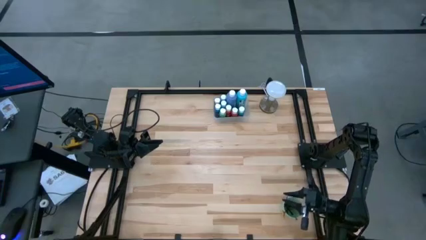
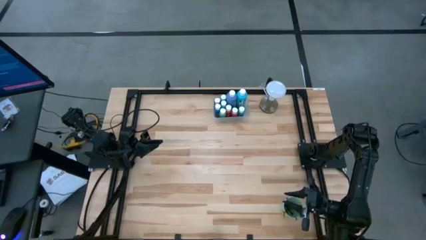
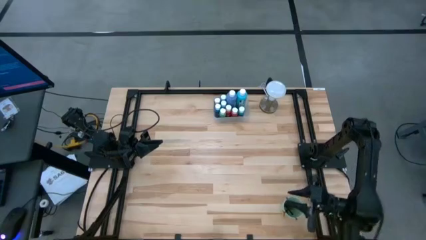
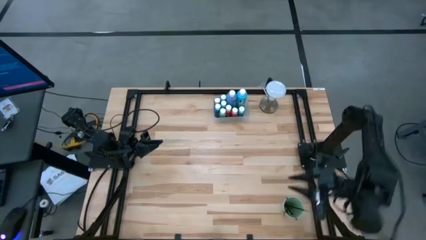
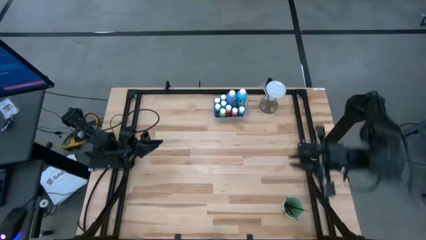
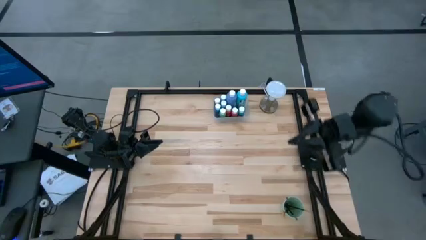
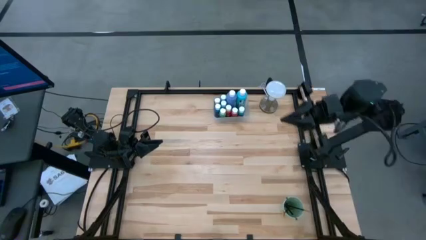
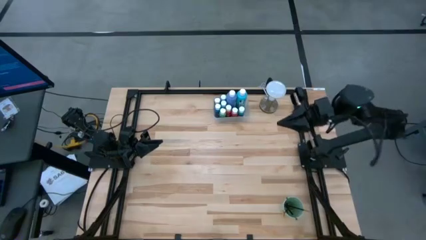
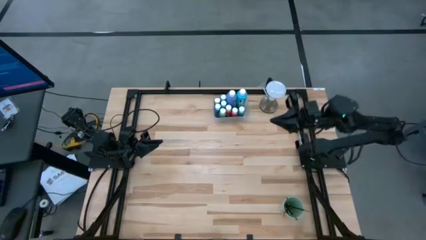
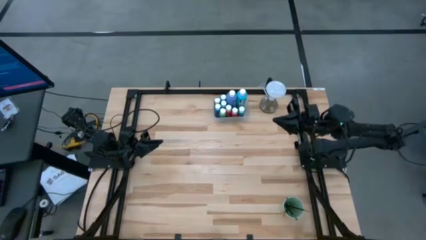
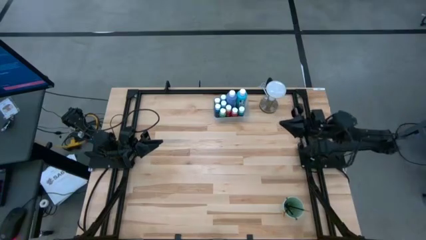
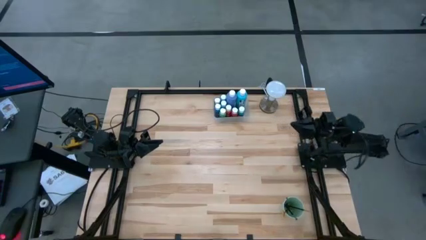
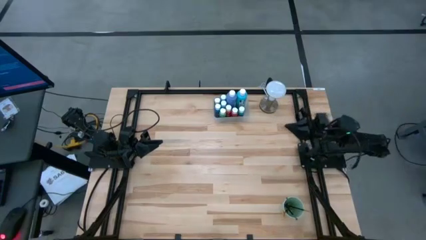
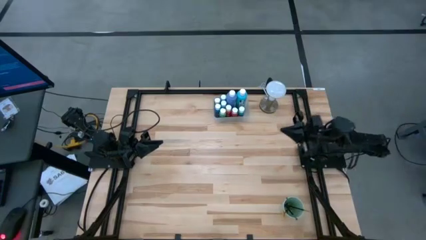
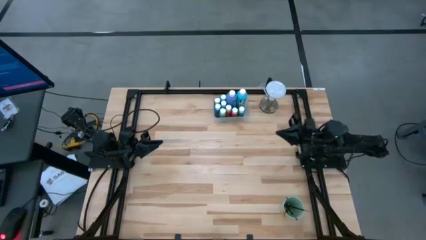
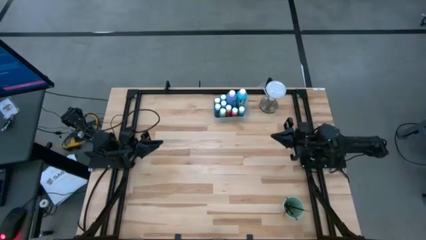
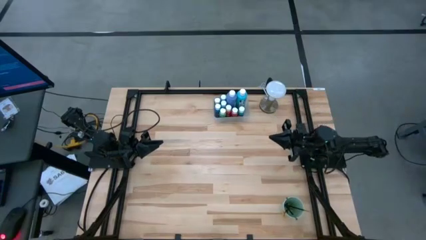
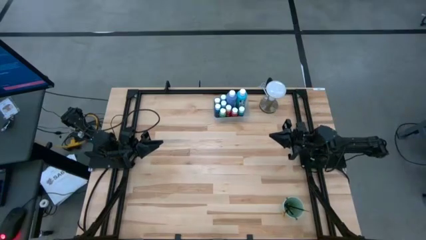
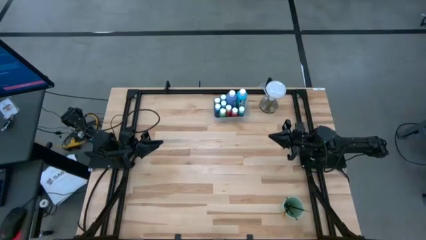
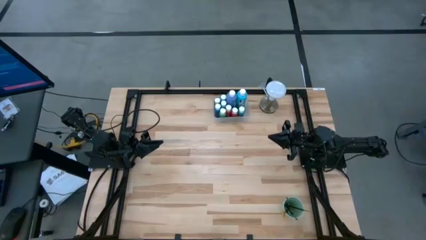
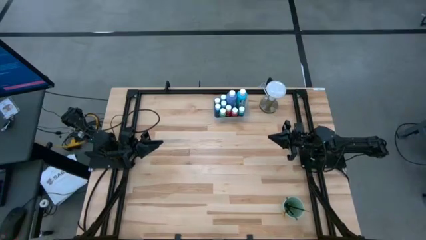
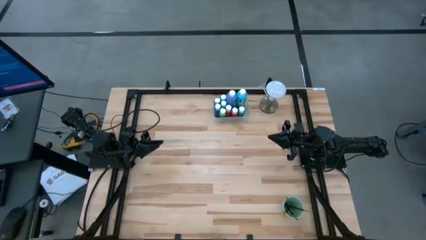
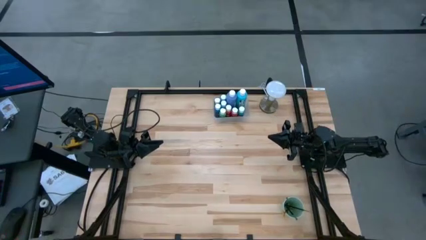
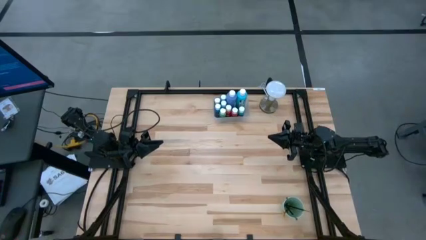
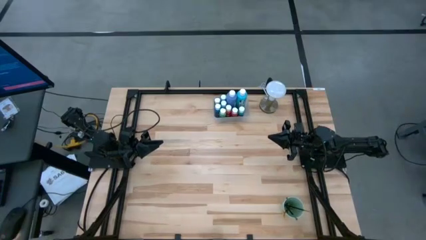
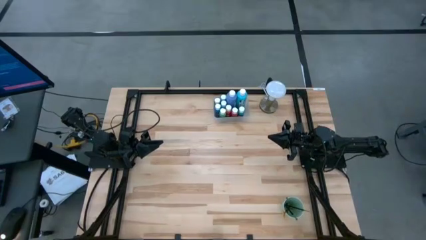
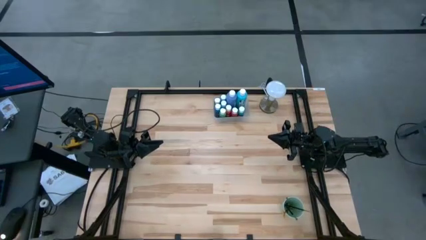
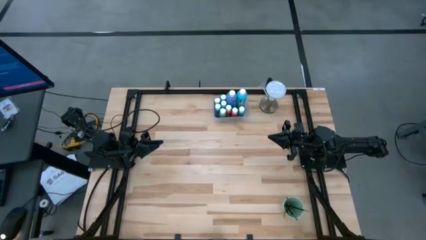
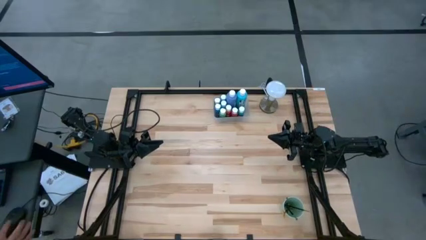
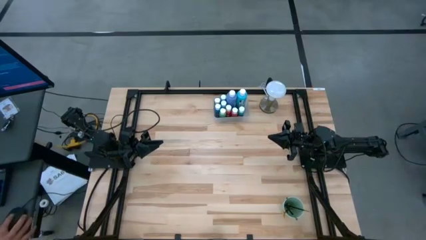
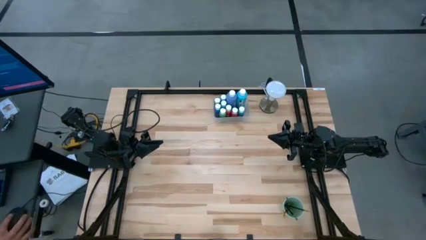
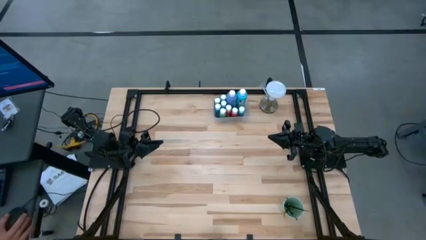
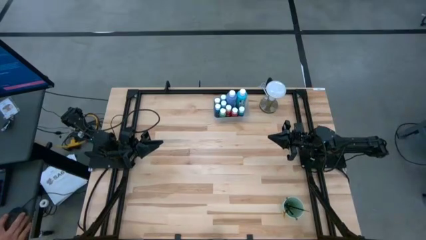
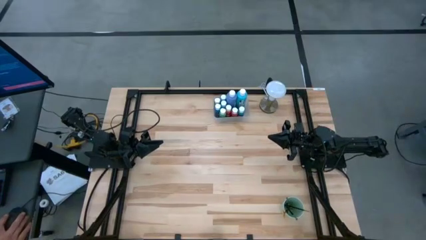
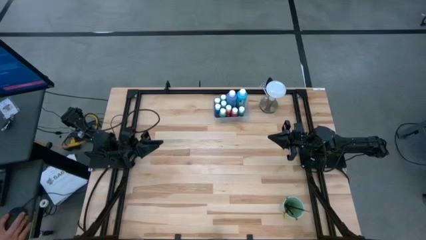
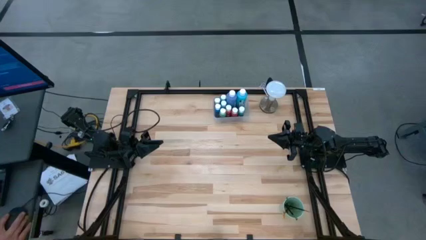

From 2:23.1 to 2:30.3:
Task: Pick & Place Paint Supplies
Return to Home Position

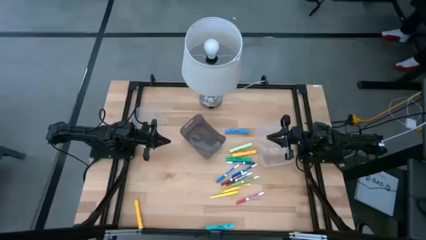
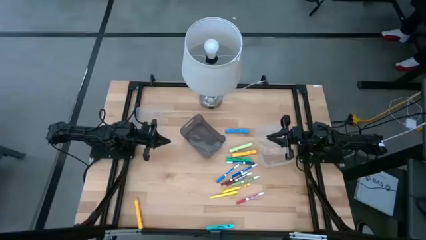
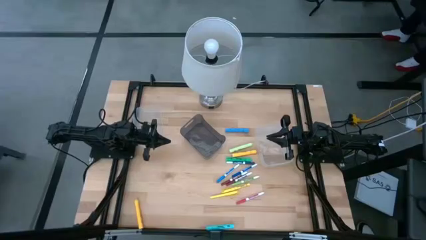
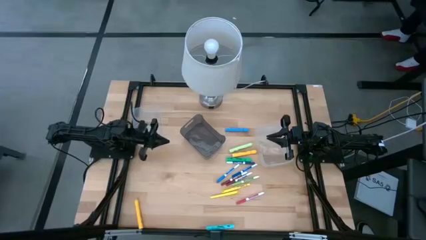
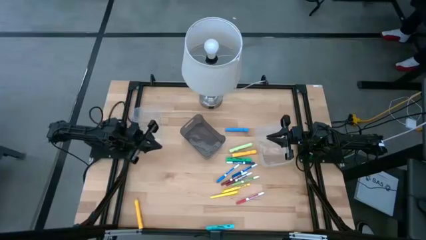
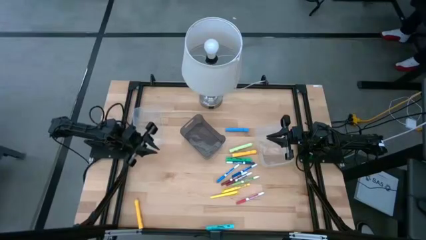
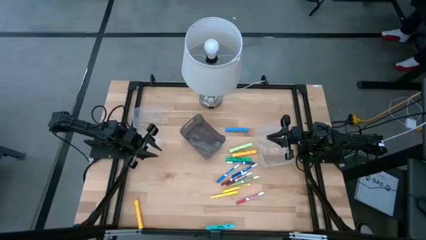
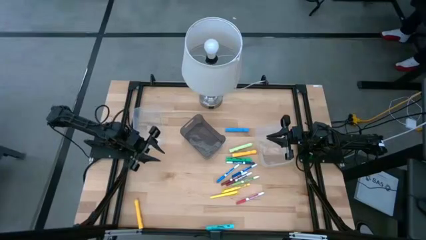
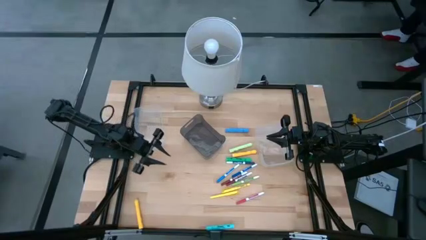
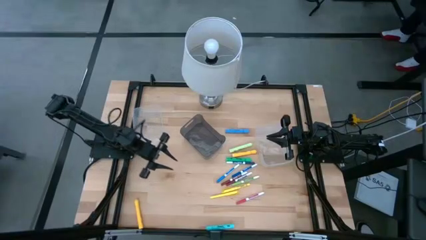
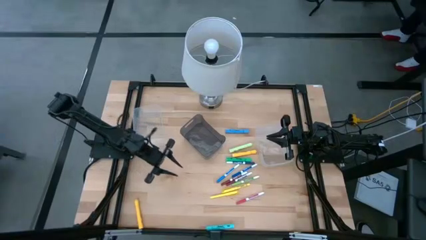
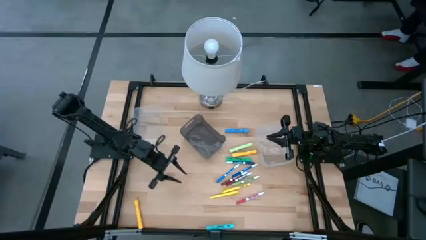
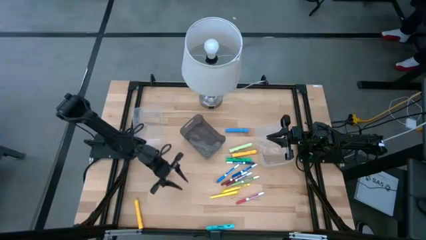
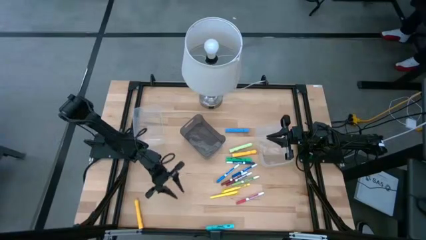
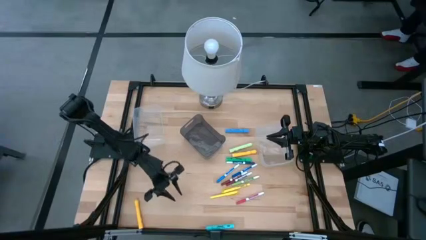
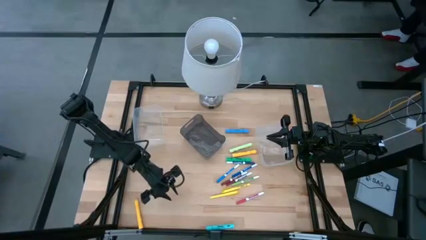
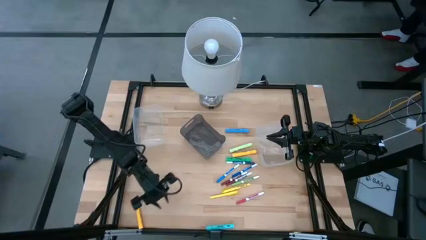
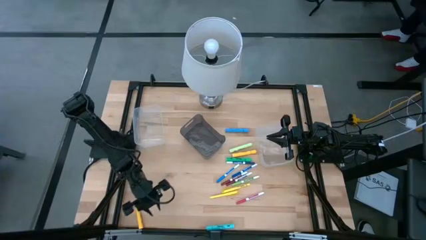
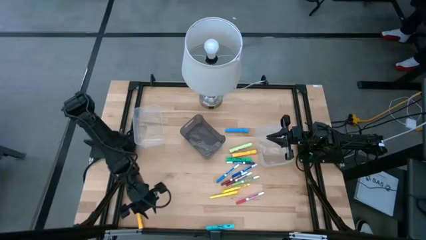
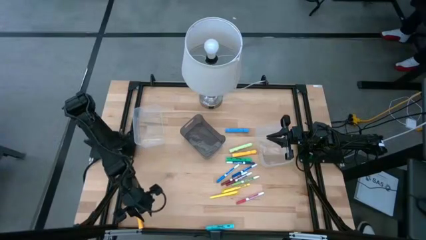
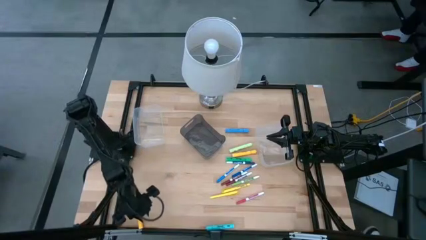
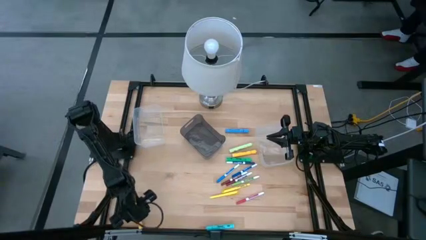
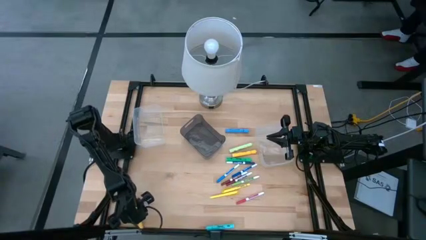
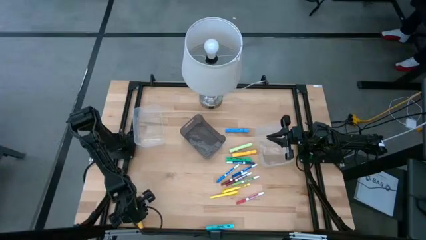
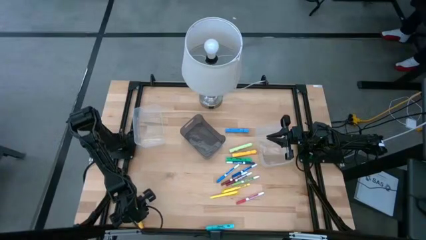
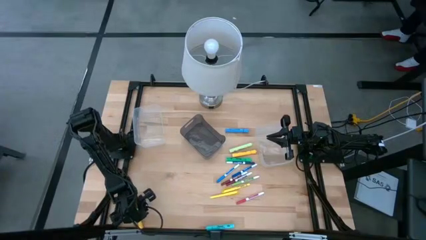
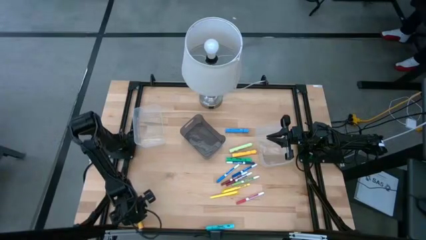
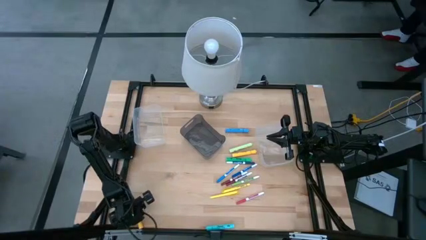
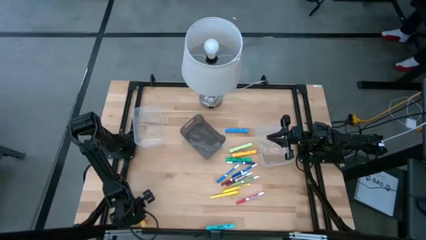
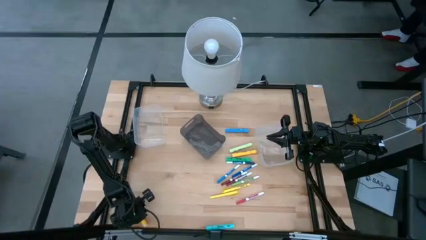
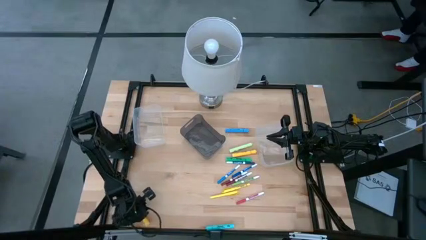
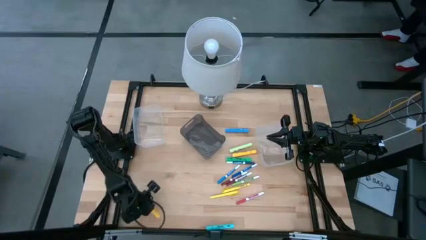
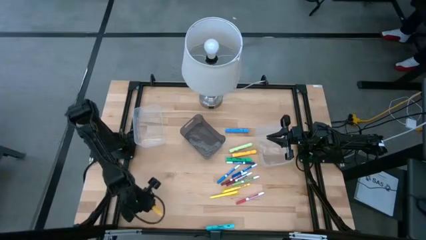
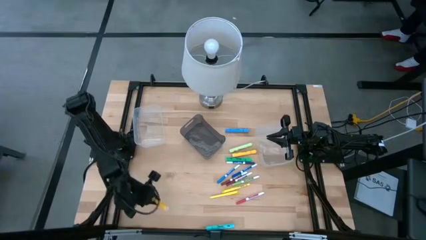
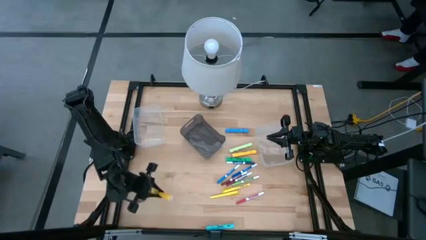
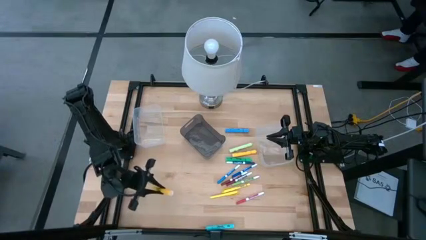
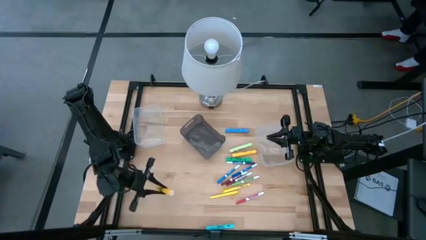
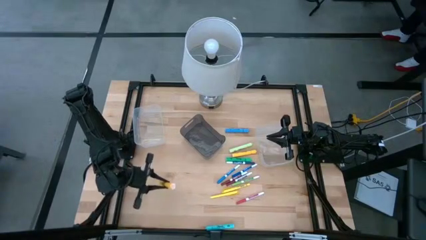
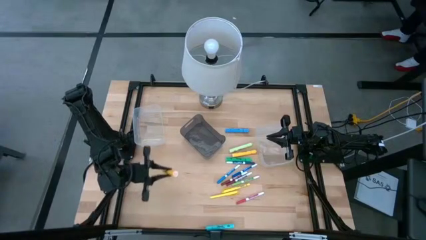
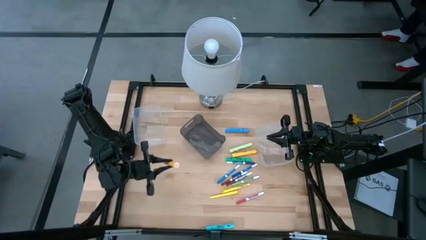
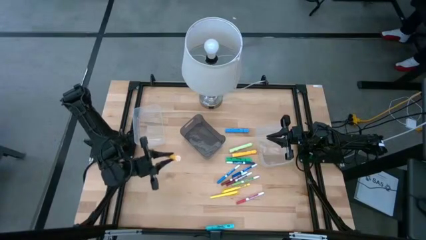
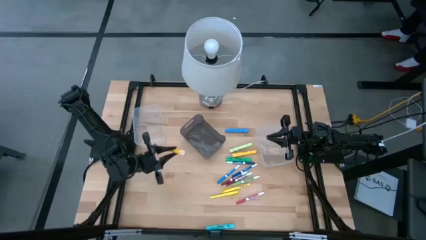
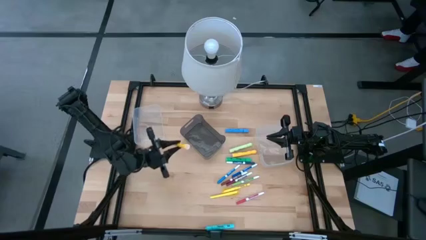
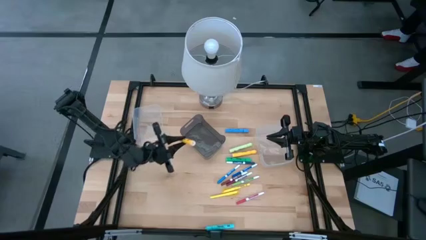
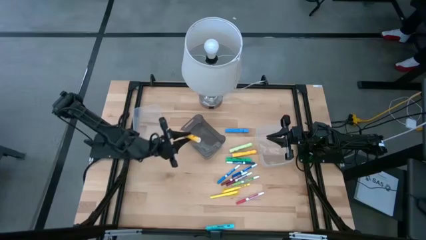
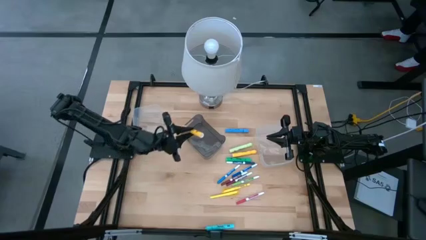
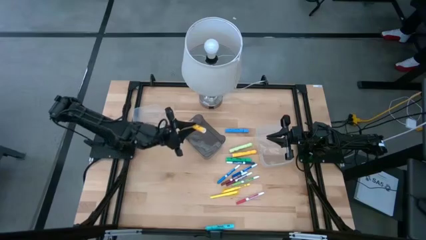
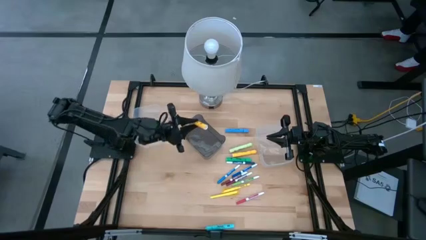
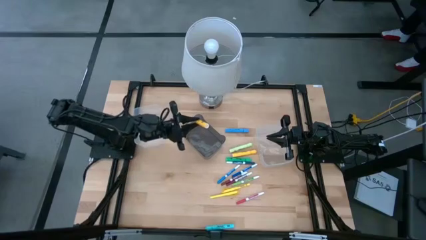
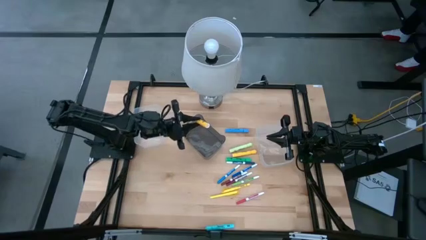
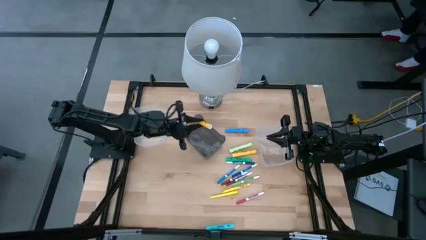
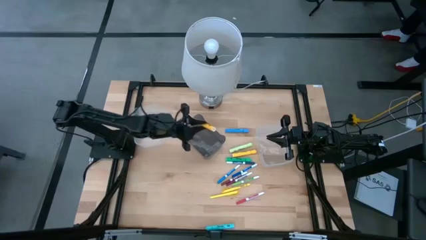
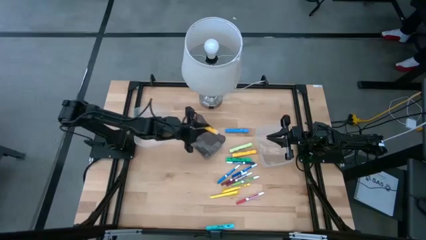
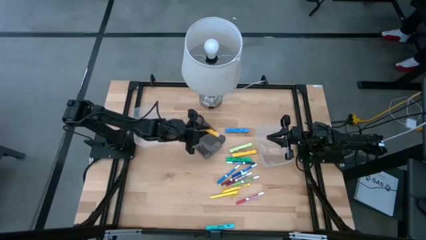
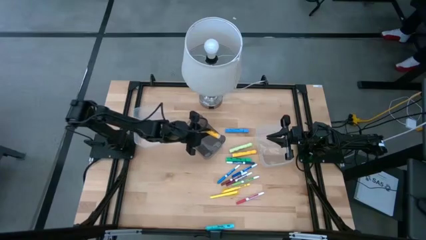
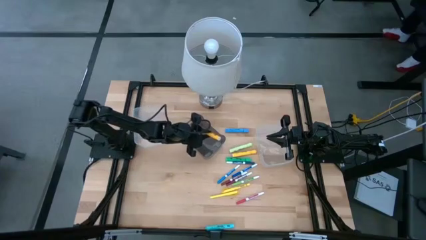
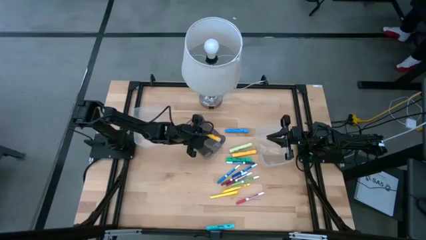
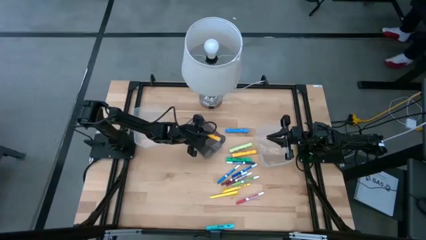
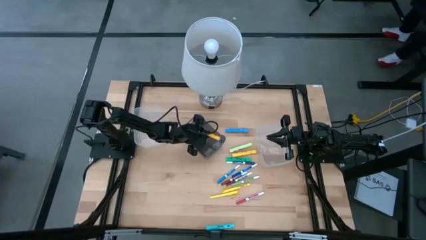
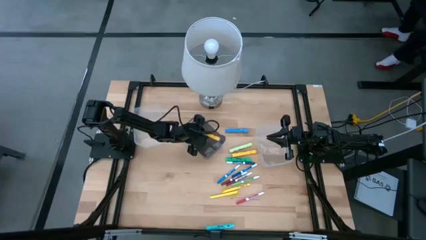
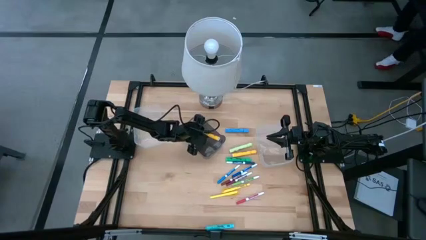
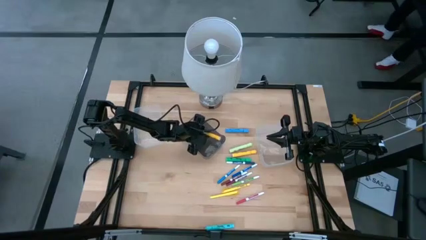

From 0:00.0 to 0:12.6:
Task: Pick & Place Markers
Put the bottom yellow marker into the black bin
